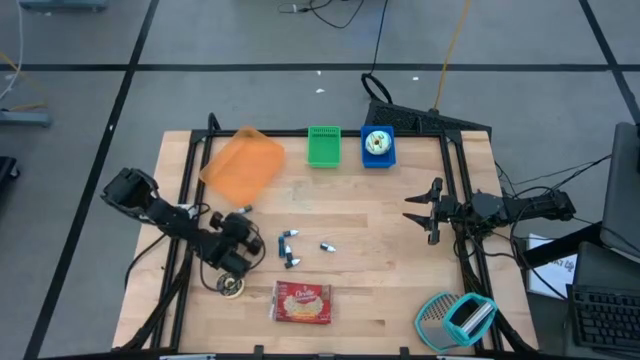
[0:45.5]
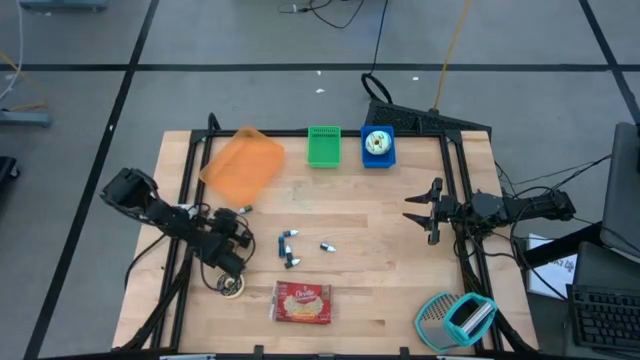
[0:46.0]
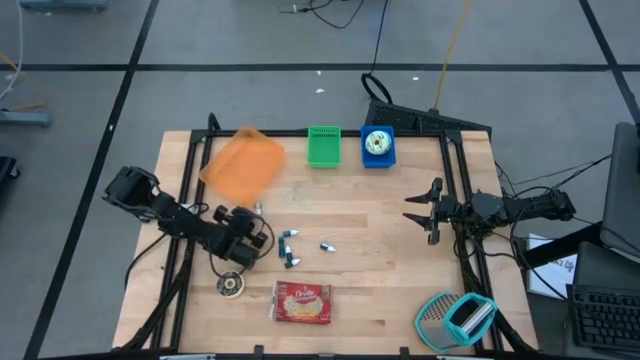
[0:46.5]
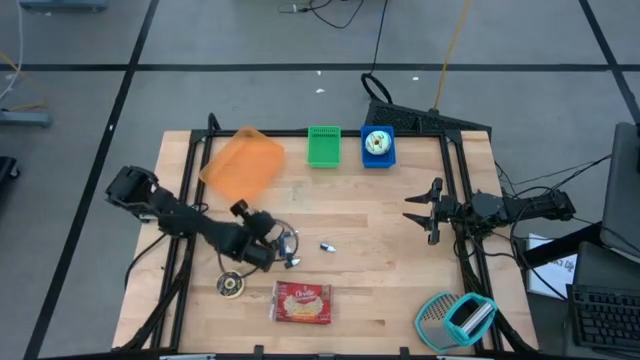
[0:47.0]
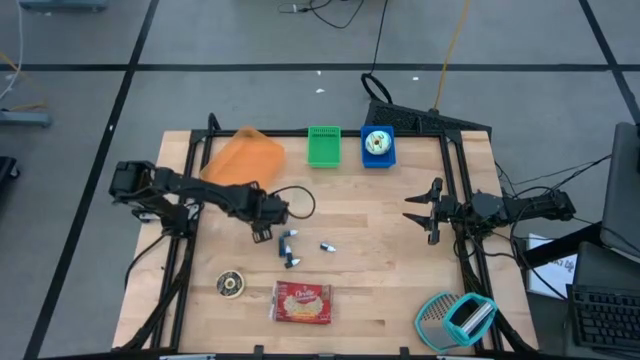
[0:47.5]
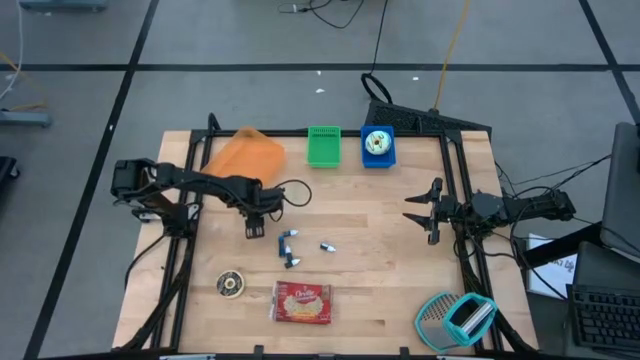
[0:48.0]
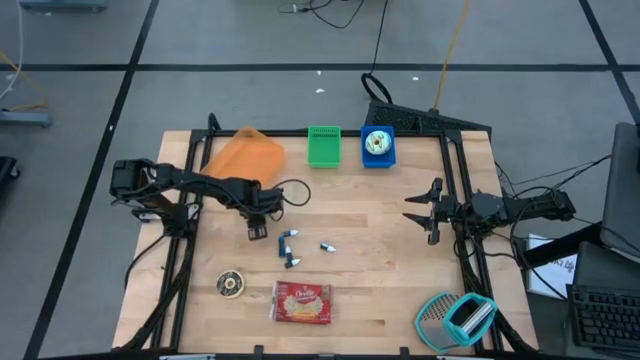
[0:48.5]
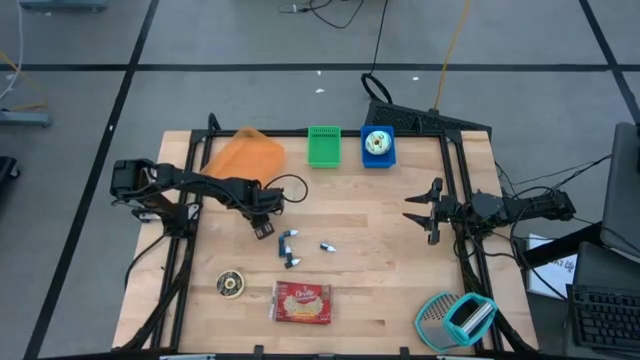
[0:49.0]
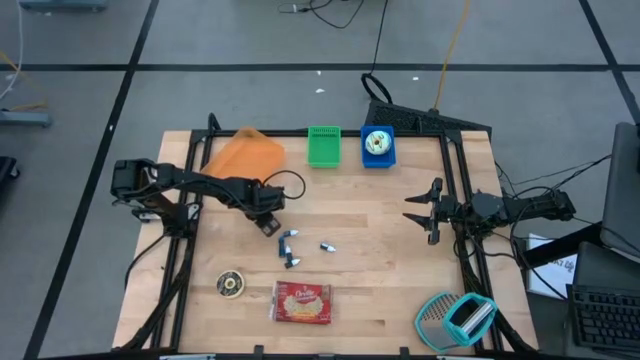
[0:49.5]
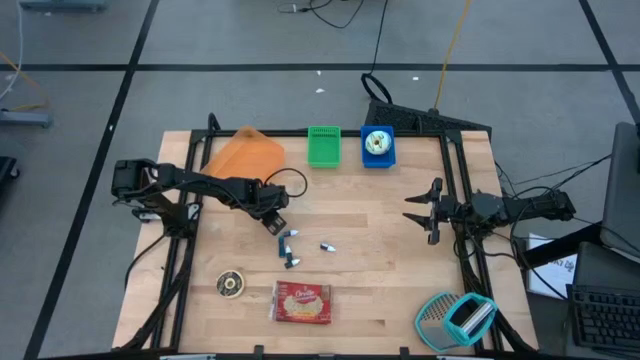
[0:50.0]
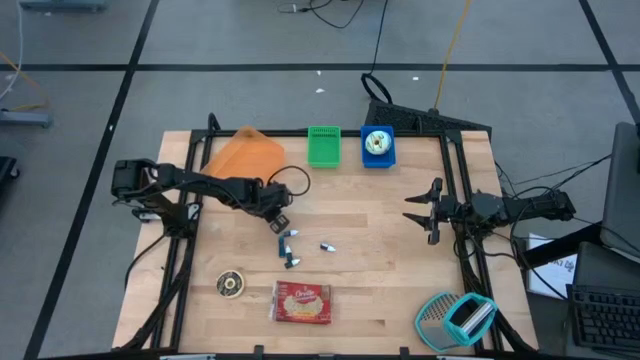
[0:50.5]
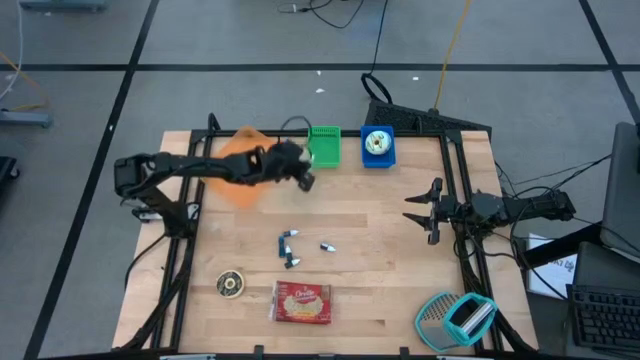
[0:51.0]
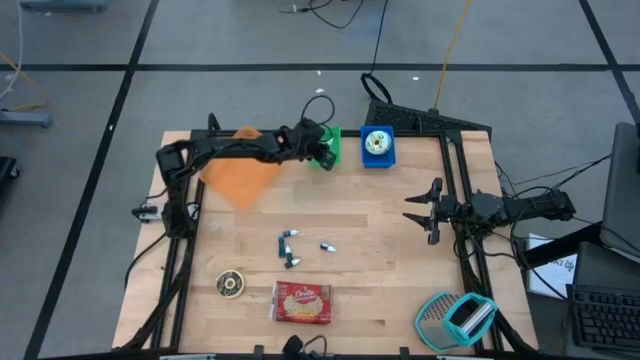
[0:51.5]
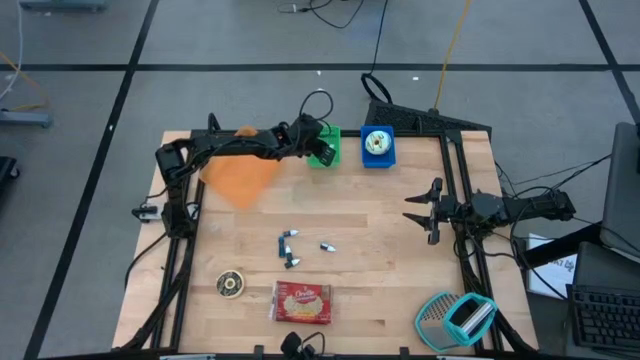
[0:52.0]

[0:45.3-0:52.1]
Put the green food coloring bottle into the green bin

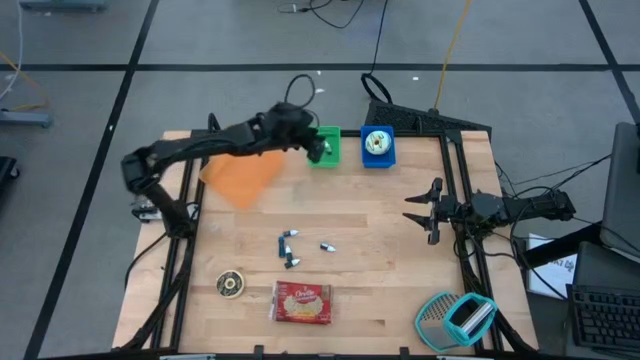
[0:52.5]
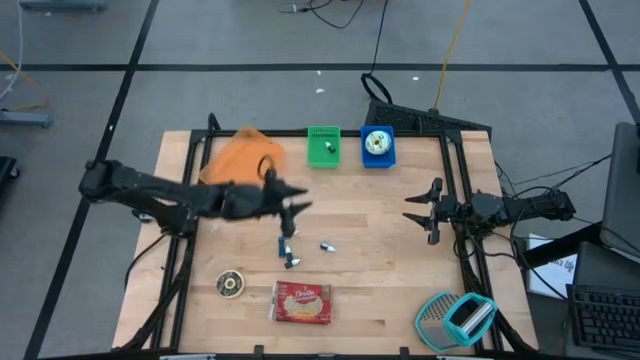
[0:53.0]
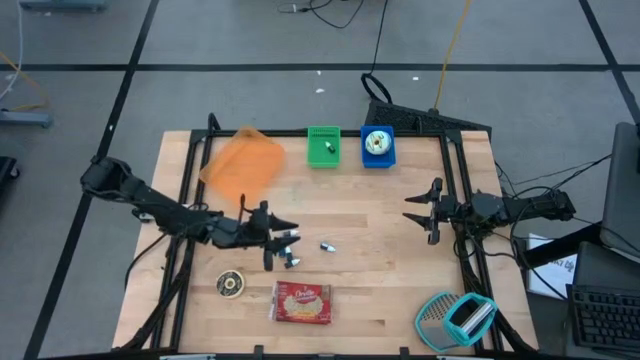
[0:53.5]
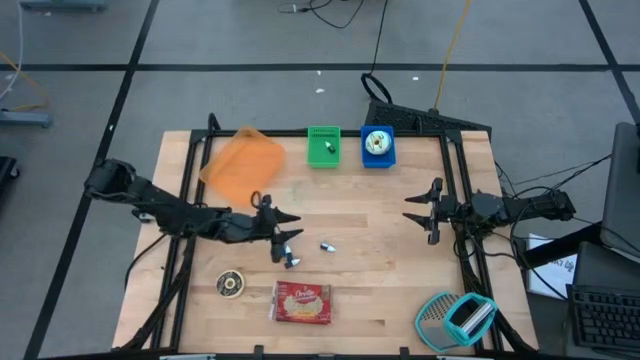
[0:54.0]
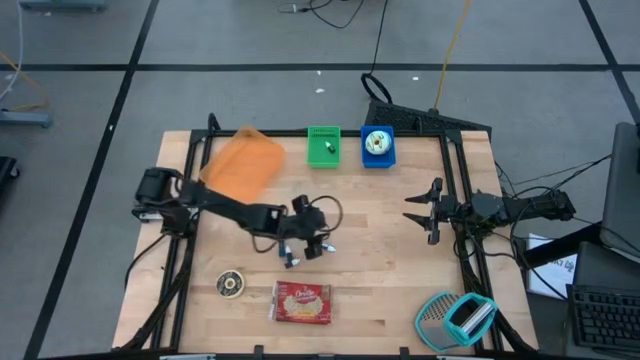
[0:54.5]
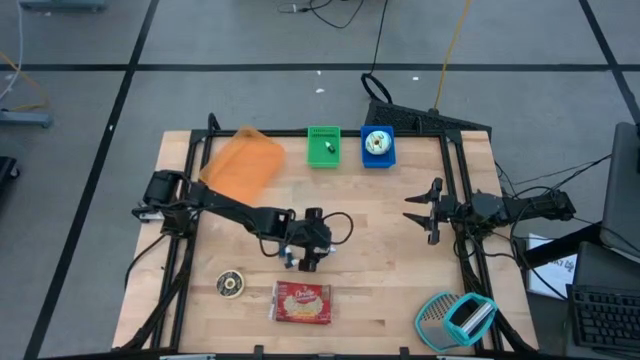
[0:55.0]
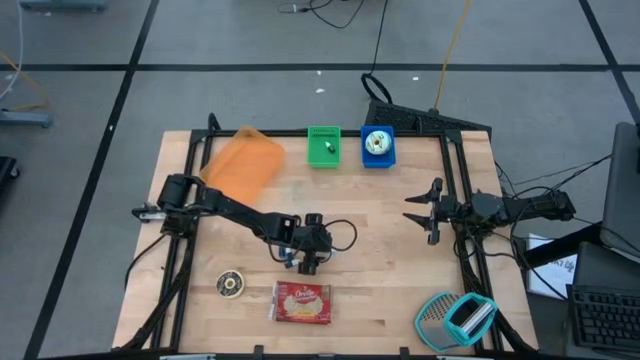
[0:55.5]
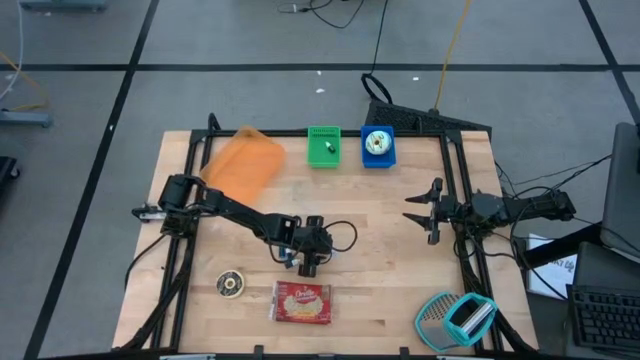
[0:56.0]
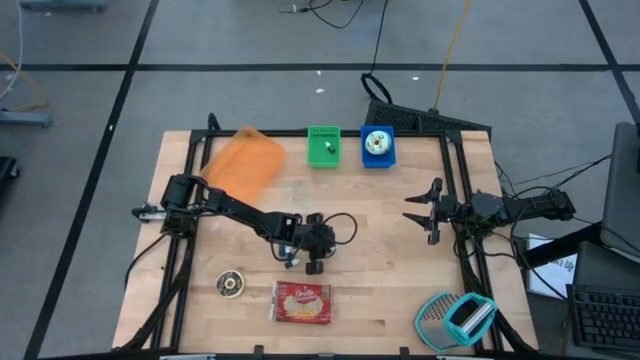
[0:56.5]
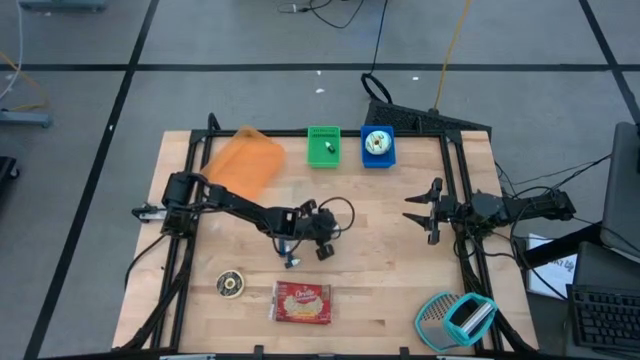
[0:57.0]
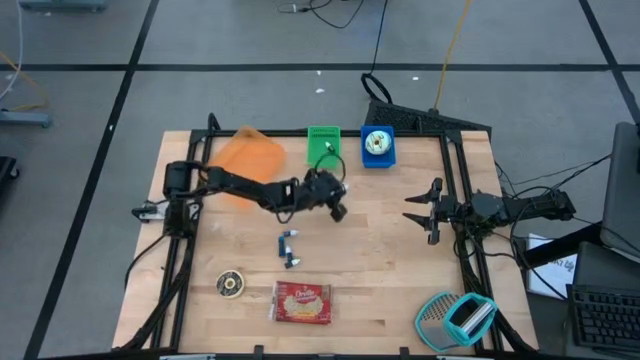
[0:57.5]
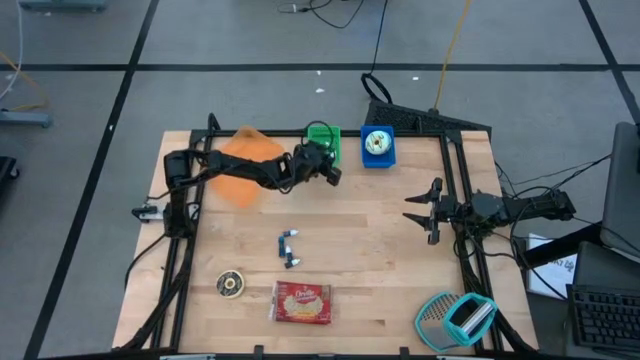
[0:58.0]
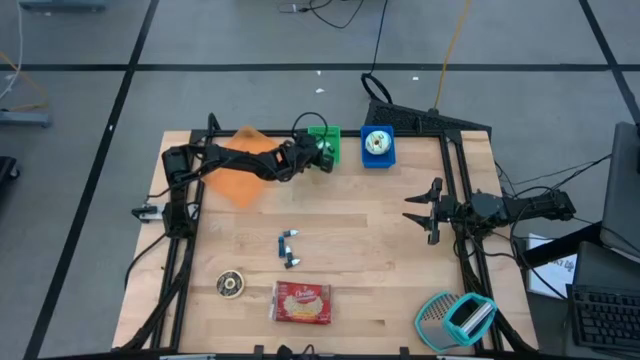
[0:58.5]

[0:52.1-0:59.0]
Put the purple food coloring bottle into the green bin
